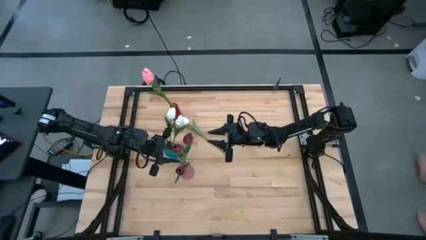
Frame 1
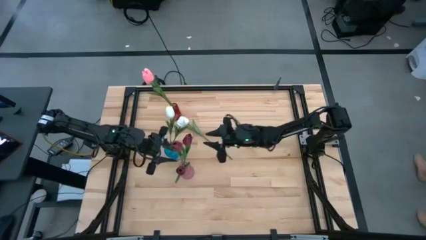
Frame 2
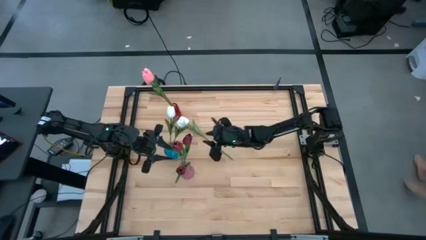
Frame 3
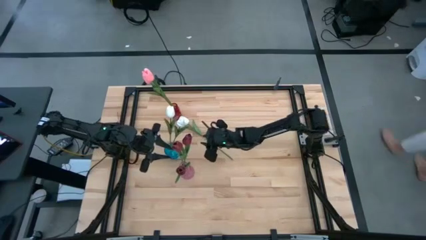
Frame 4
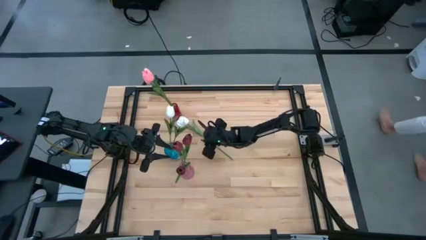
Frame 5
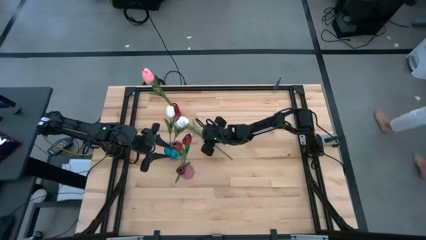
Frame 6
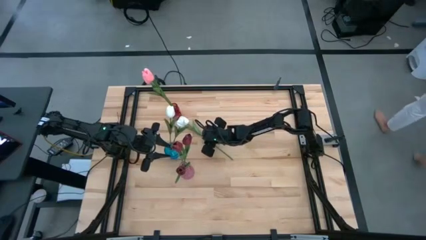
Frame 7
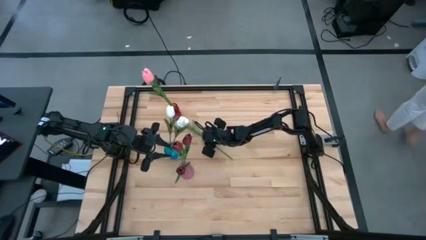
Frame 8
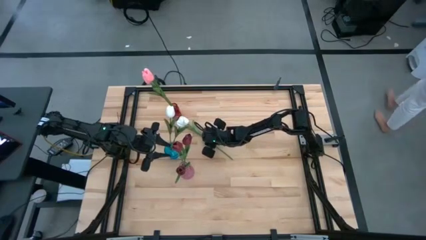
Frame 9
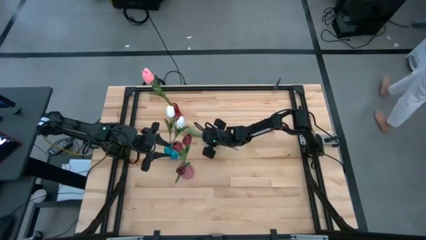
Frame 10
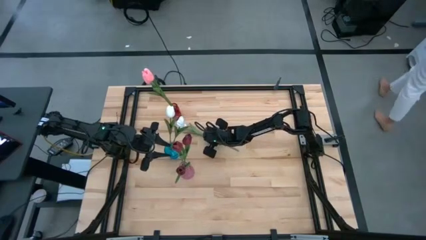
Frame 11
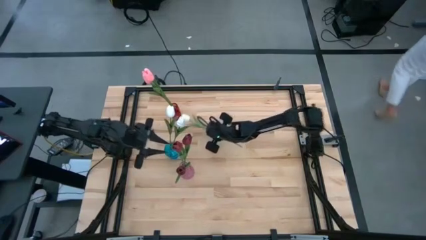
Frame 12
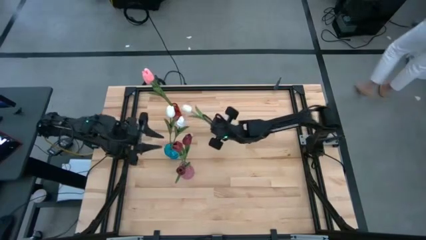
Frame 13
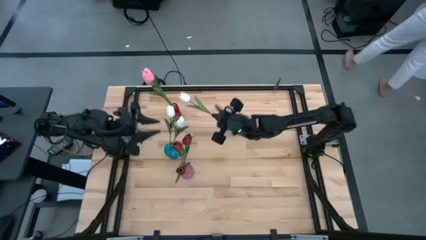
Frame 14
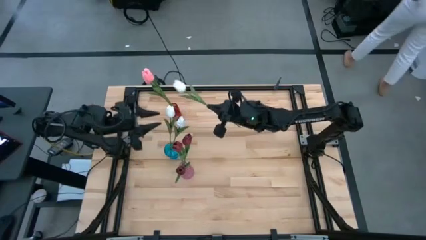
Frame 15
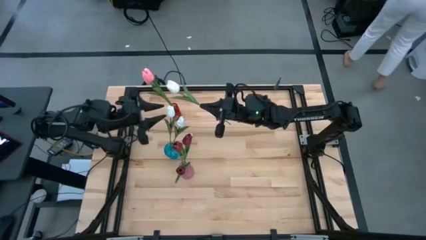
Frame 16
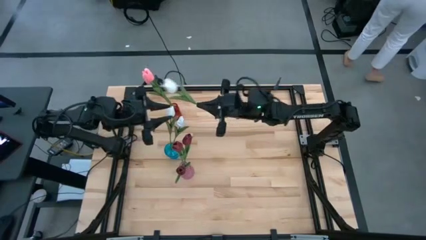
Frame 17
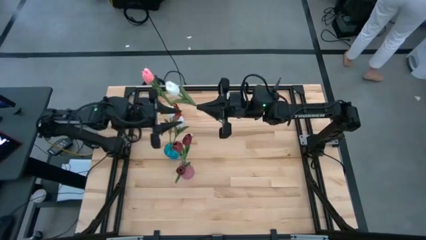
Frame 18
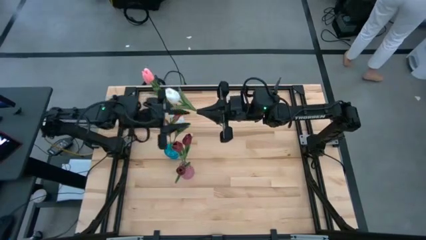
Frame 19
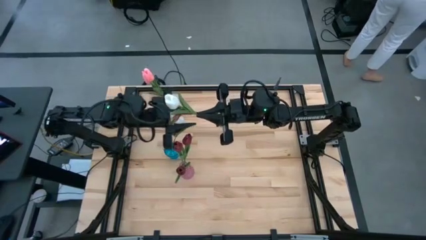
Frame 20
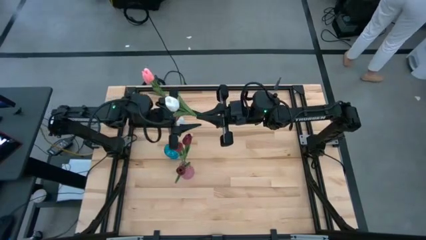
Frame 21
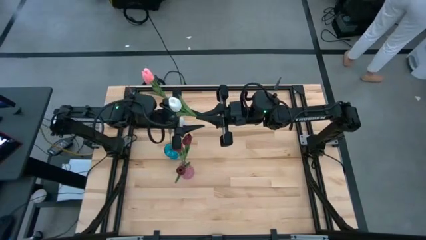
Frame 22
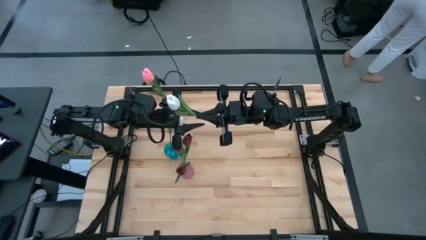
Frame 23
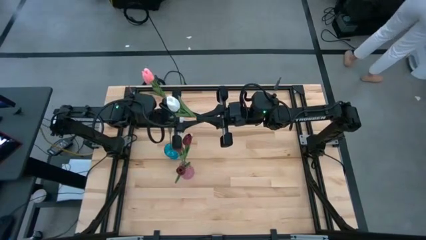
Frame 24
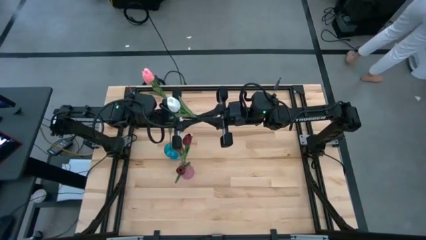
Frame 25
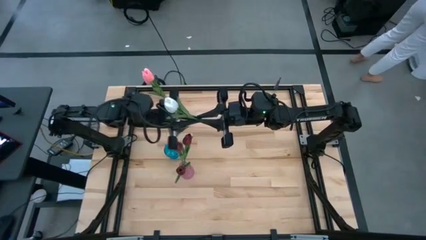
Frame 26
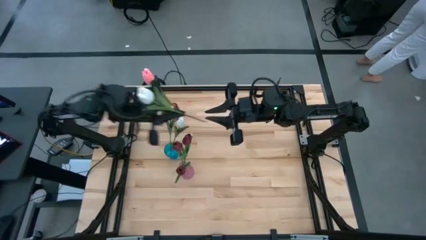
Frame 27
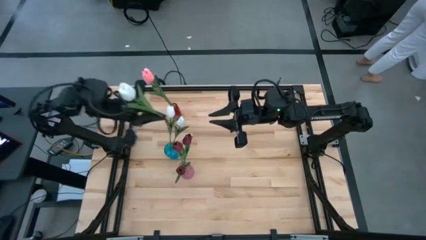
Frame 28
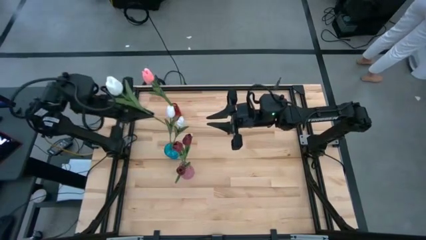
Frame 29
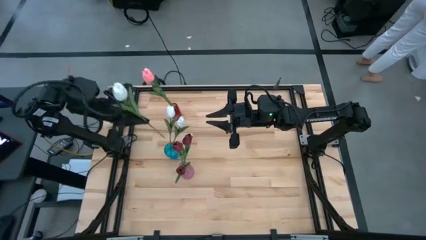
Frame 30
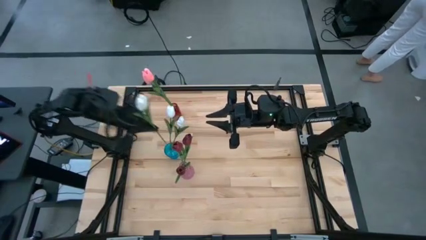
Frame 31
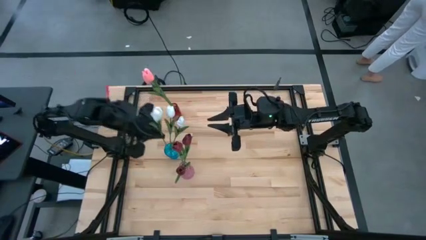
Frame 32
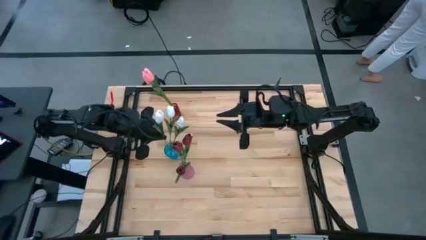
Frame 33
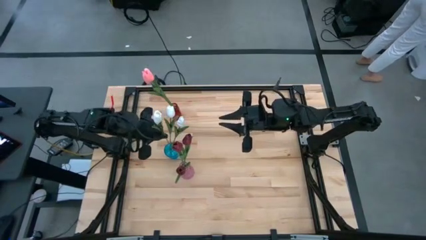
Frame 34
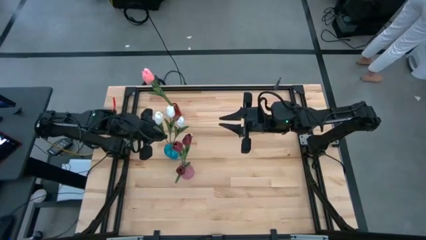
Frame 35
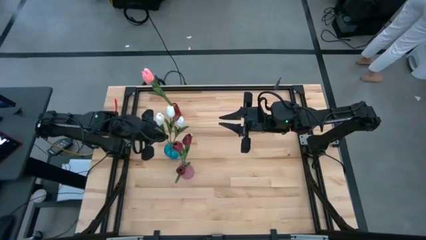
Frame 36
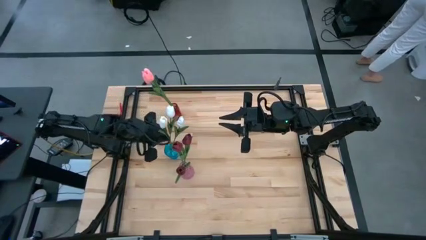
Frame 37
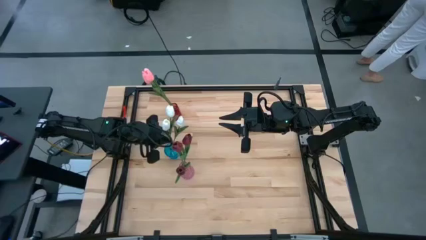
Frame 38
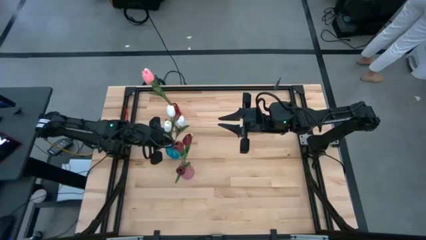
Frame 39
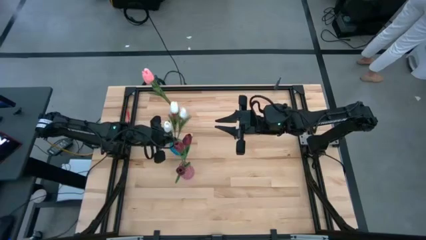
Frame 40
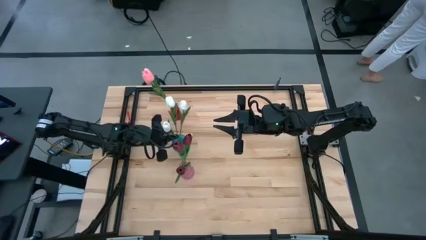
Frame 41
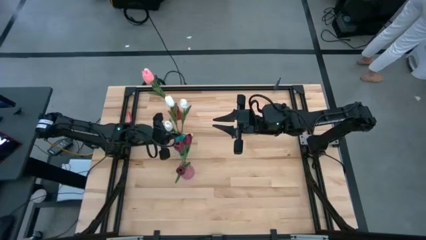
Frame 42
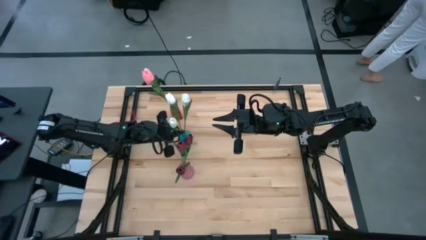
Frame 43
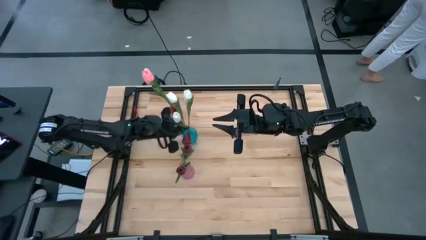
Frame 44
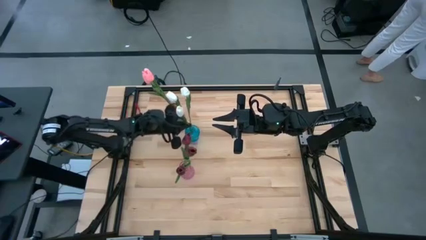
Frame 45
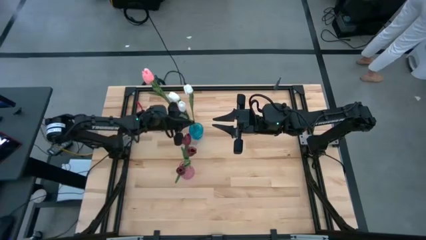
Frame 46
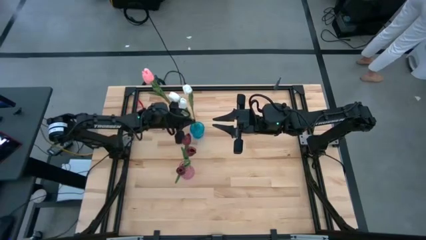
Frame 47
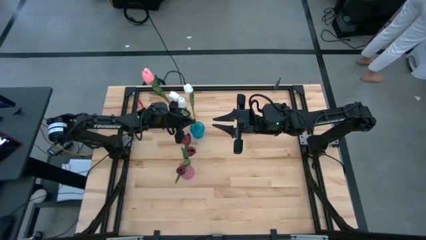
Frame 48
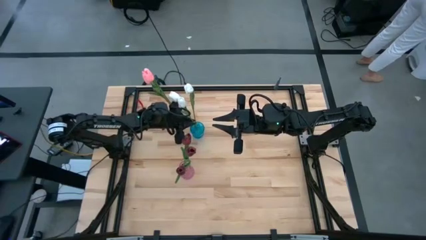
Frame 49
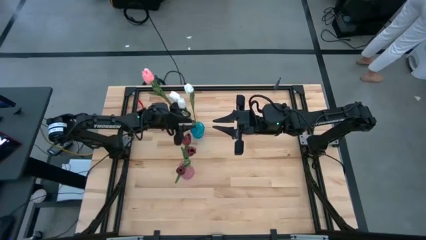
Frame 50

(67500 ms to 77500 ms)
Task: Sort flowers into vase by color
Put the white tulip into the blue vase

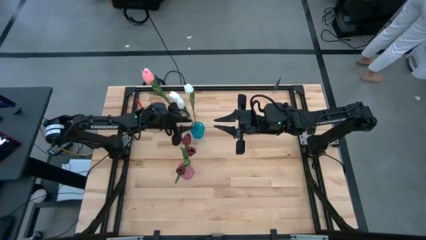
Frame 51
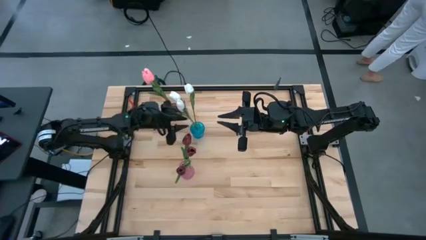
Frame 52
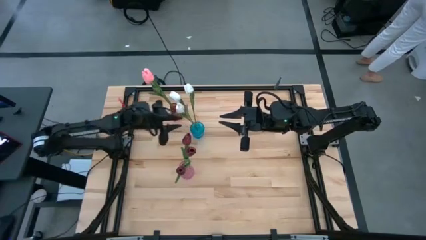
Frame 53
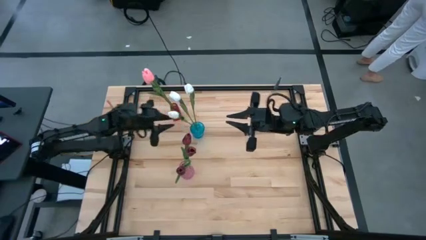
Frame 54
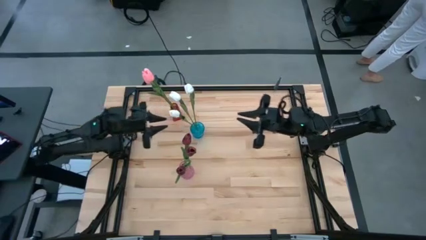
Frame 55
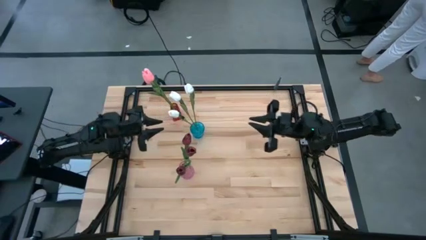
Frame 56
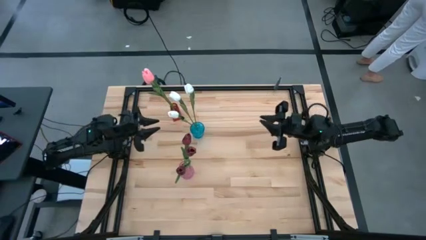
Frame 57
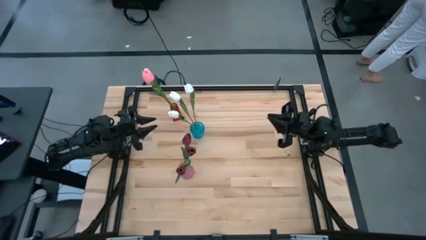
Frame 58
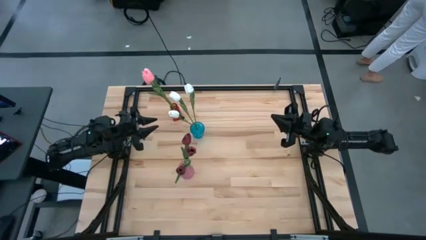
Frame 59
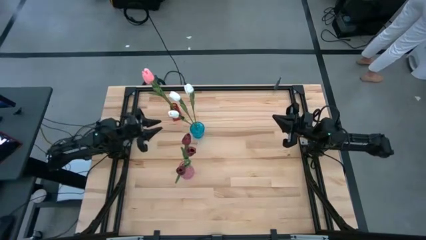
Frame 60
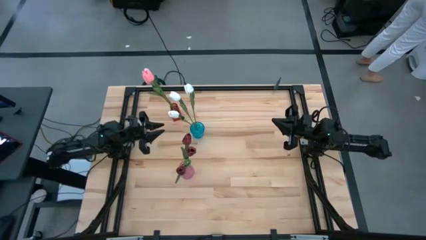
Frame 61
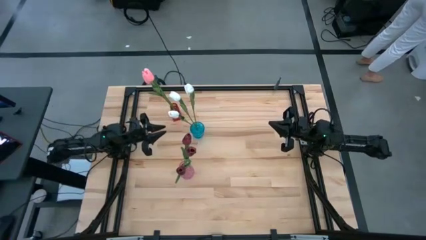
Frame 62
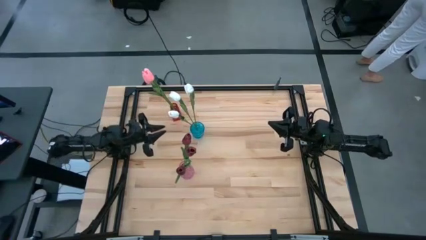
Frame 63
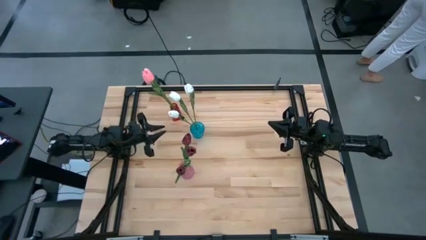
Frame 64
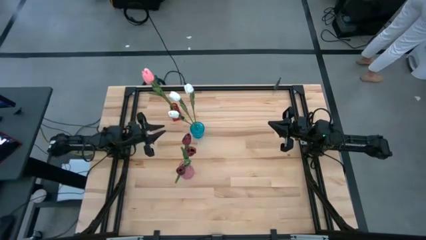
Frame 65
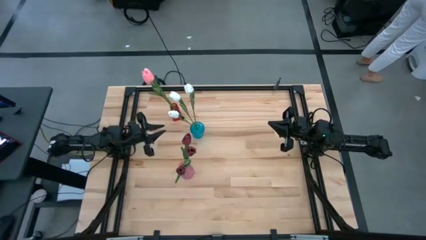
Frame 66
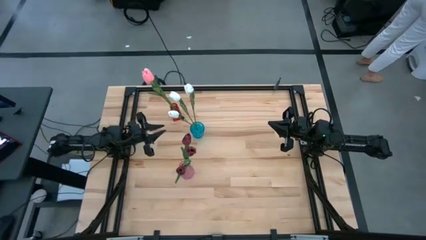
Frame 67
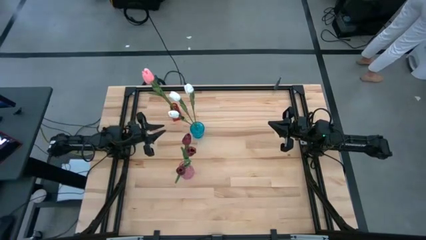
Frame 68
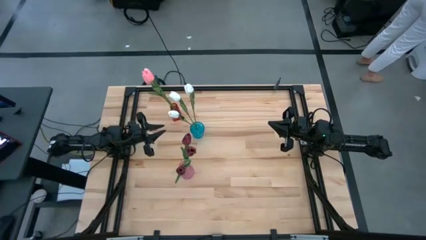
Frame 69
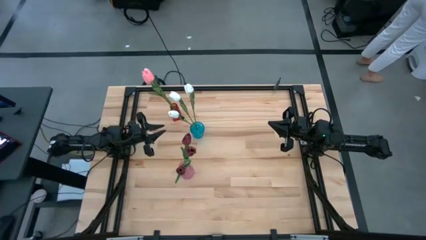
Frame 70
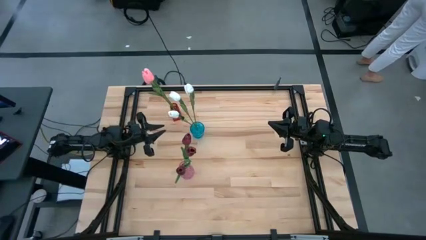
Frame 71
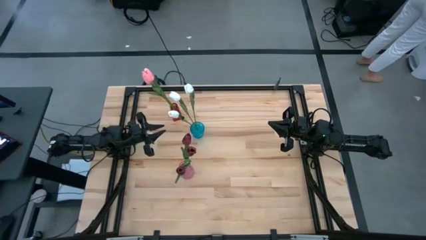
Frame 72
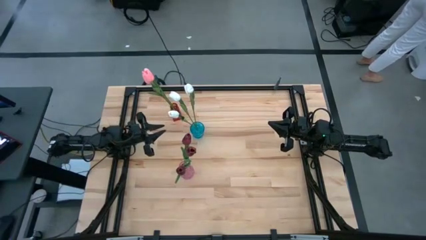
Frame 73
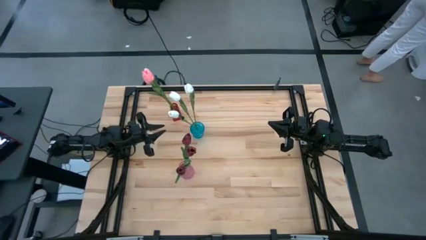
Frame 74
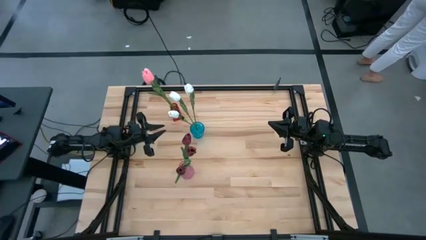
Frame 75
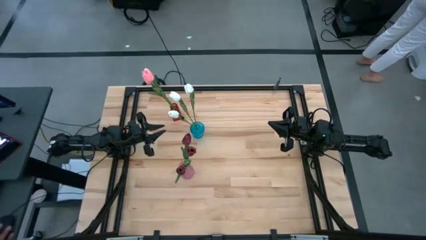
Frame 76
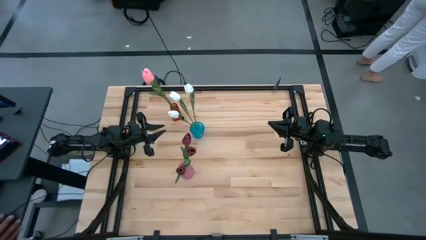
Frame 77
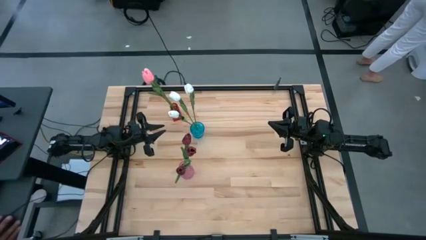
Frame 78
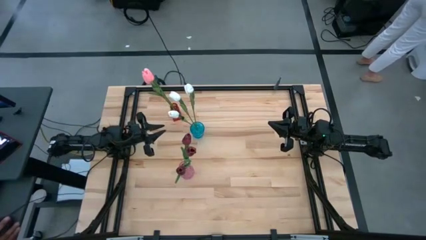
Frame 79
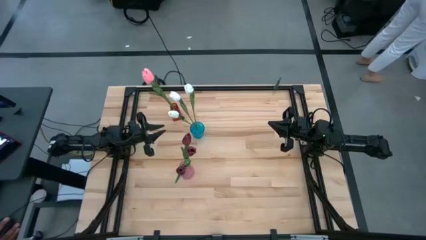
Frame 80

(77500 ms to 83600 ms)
Return to Home Position
